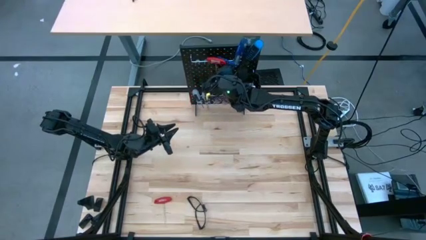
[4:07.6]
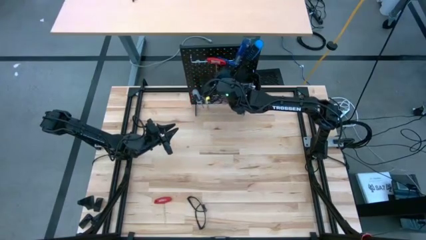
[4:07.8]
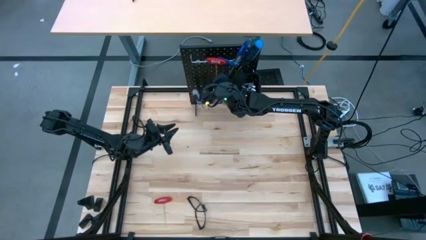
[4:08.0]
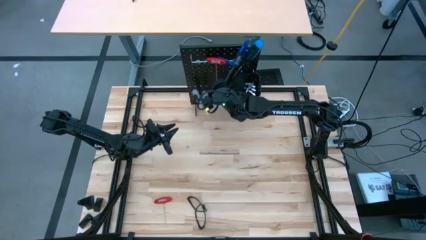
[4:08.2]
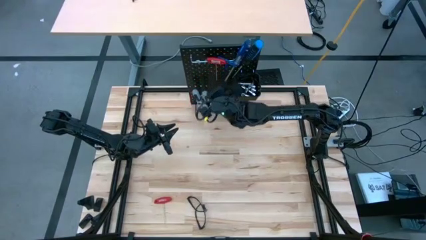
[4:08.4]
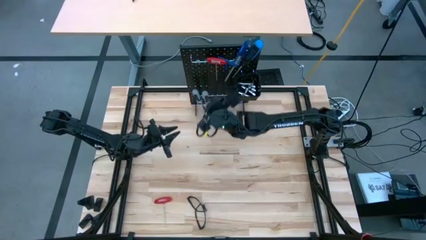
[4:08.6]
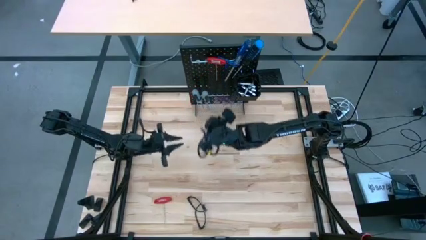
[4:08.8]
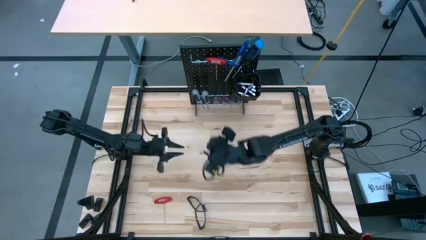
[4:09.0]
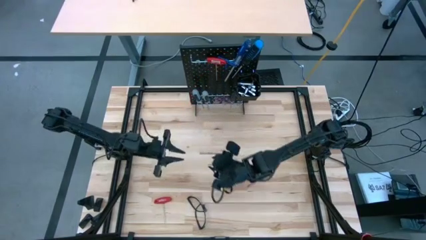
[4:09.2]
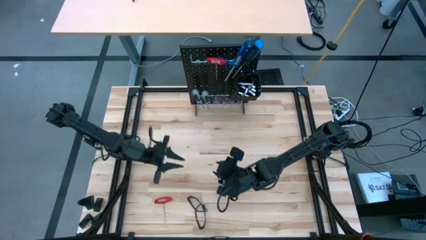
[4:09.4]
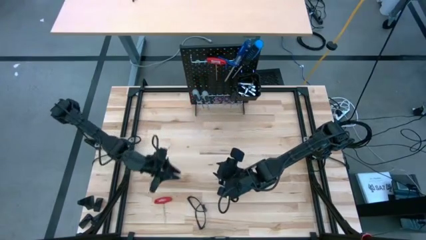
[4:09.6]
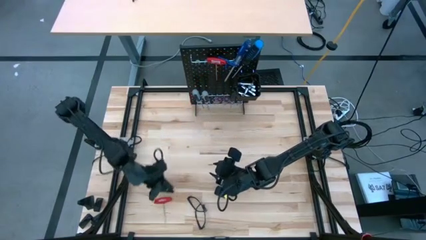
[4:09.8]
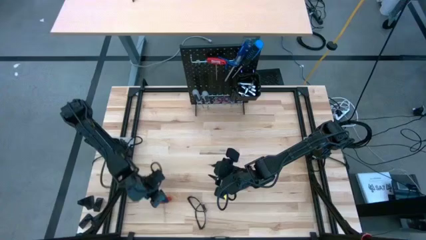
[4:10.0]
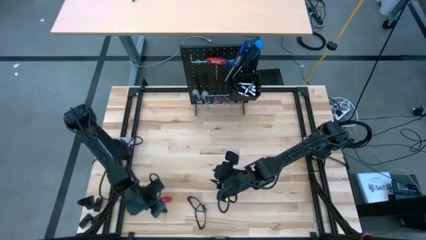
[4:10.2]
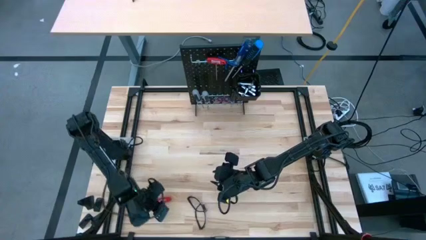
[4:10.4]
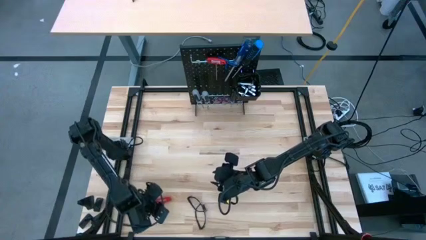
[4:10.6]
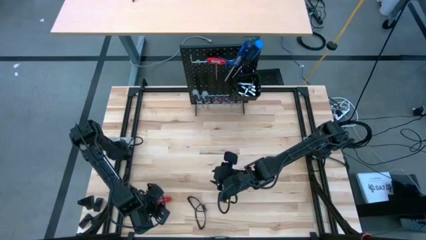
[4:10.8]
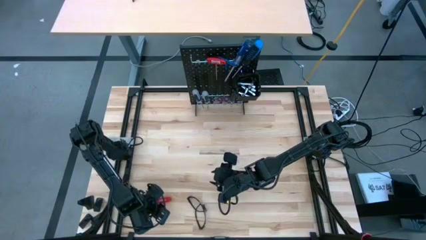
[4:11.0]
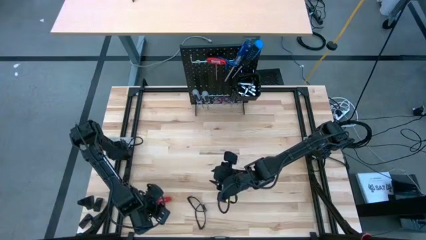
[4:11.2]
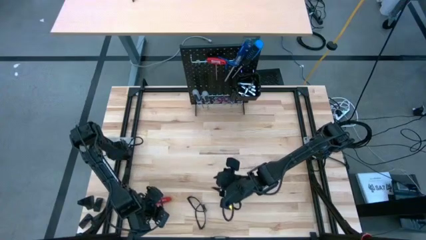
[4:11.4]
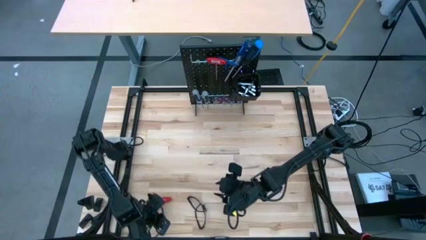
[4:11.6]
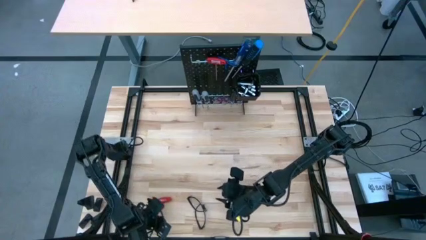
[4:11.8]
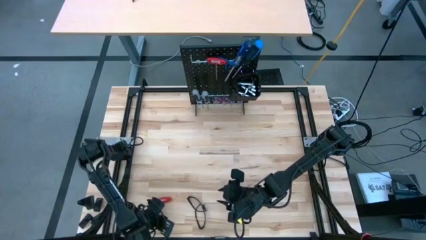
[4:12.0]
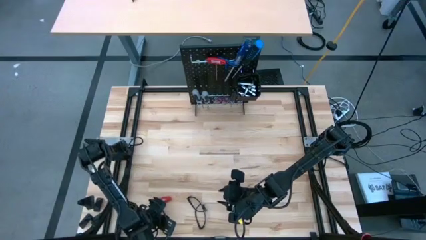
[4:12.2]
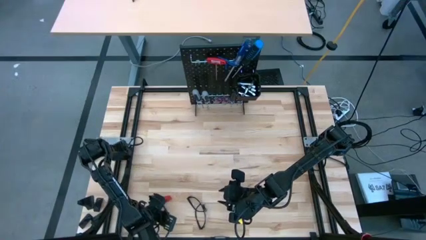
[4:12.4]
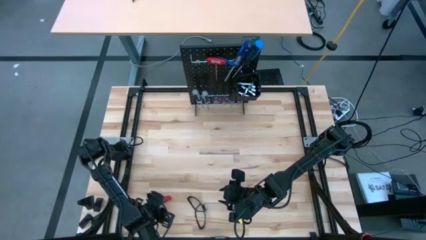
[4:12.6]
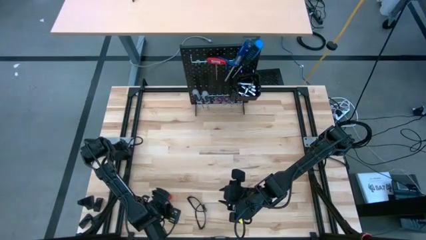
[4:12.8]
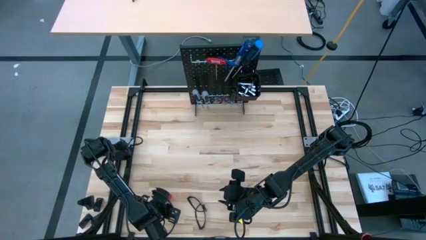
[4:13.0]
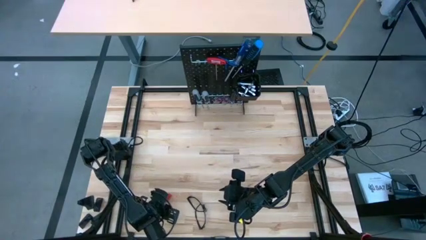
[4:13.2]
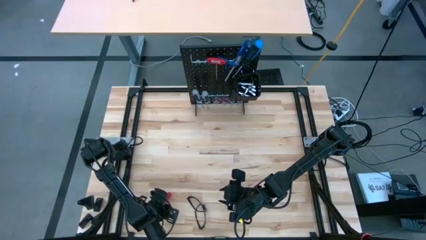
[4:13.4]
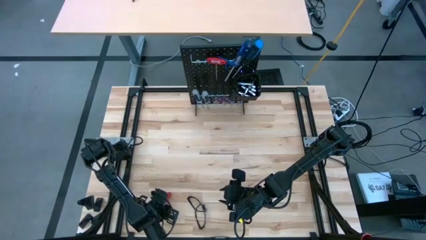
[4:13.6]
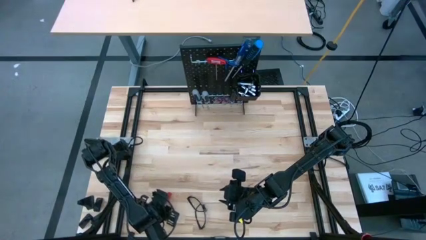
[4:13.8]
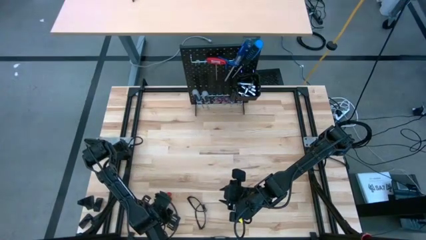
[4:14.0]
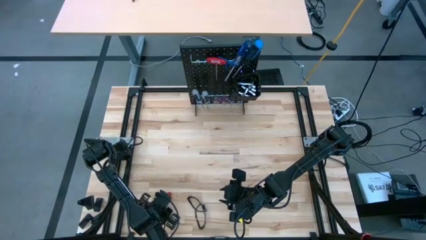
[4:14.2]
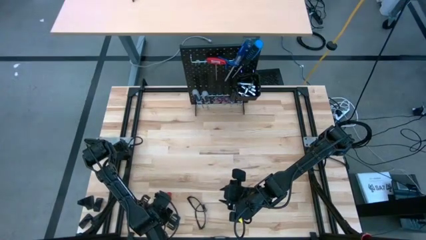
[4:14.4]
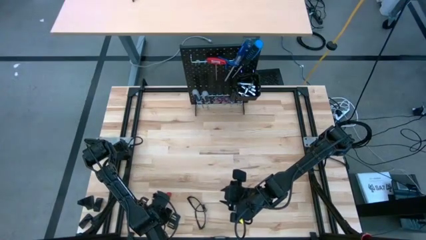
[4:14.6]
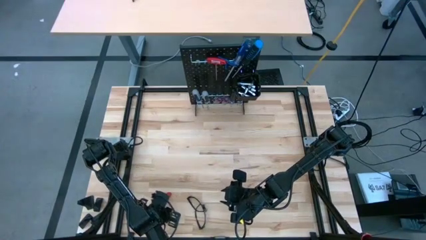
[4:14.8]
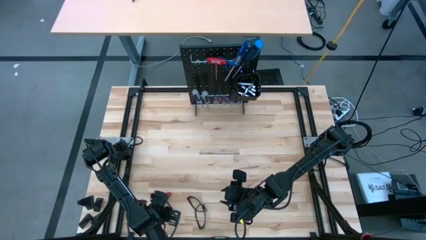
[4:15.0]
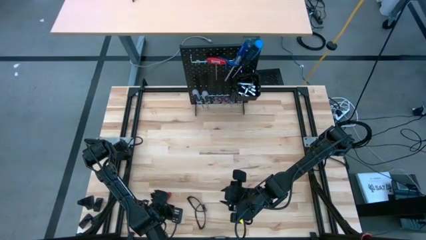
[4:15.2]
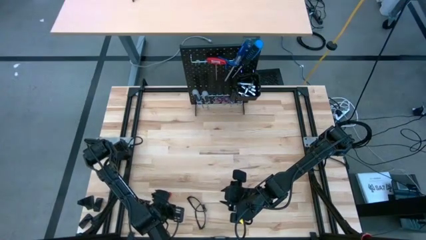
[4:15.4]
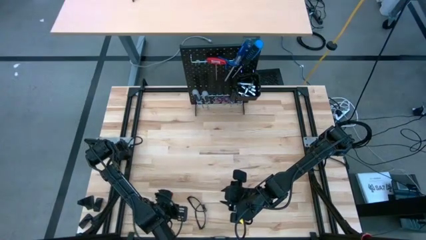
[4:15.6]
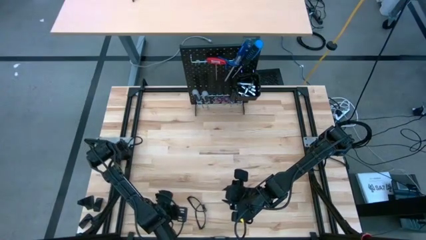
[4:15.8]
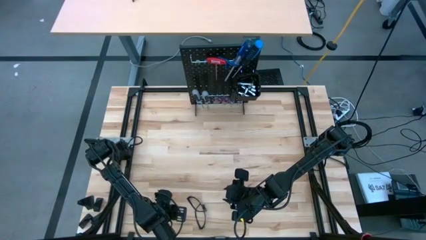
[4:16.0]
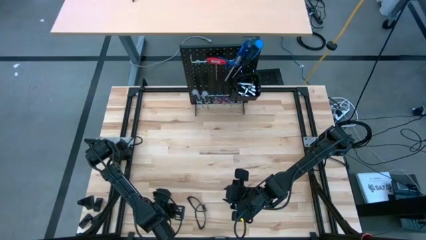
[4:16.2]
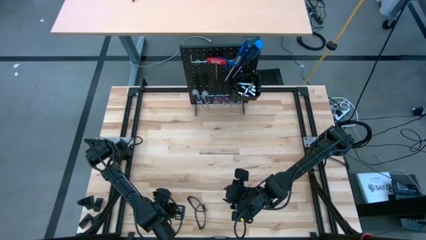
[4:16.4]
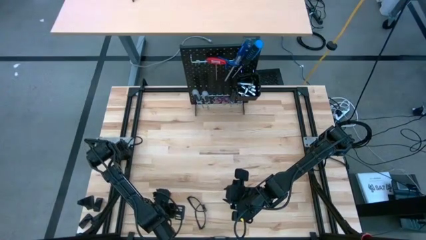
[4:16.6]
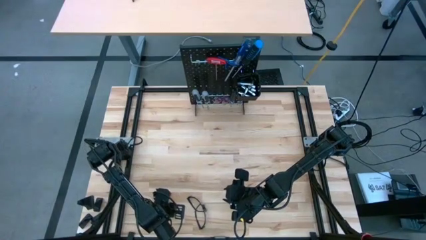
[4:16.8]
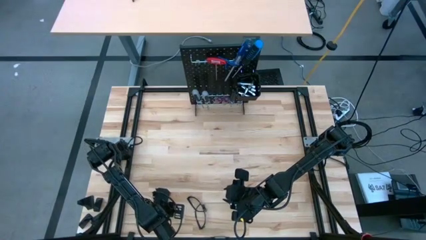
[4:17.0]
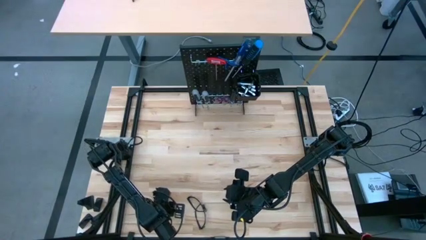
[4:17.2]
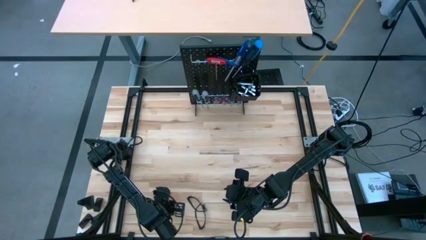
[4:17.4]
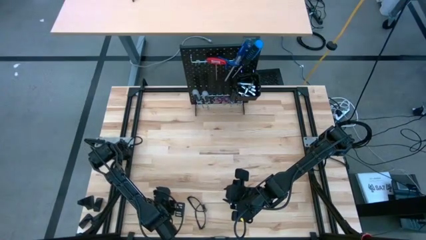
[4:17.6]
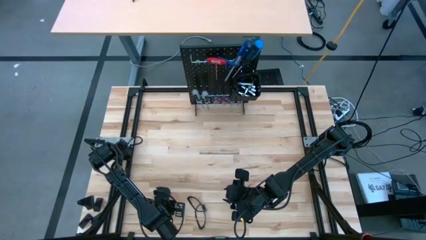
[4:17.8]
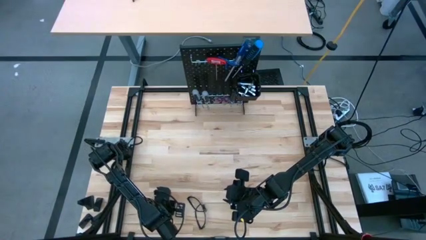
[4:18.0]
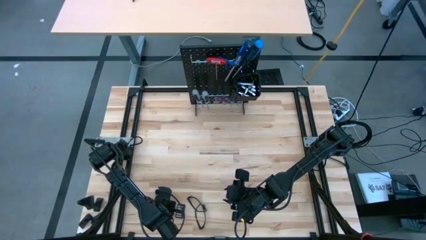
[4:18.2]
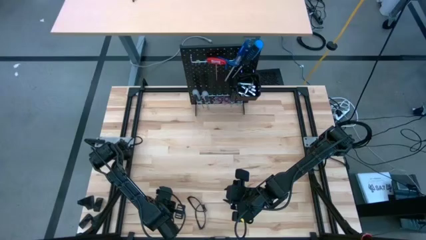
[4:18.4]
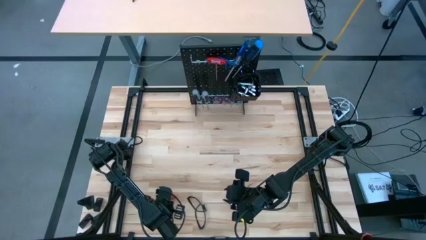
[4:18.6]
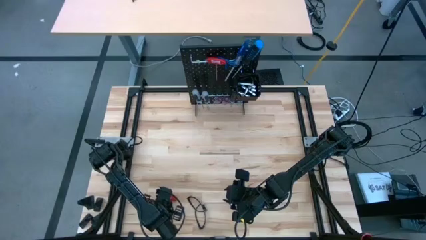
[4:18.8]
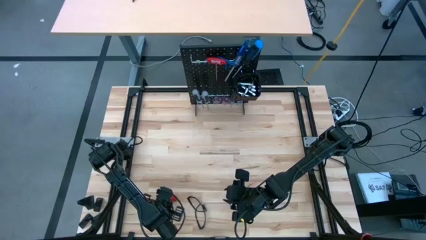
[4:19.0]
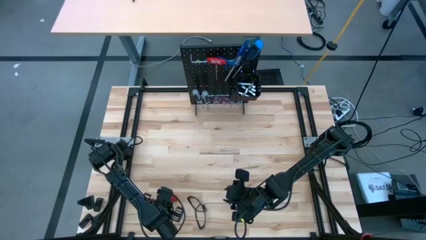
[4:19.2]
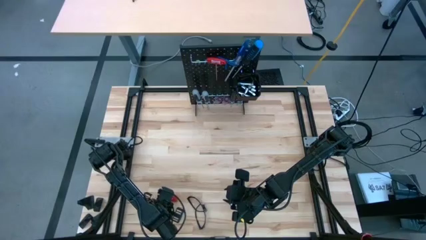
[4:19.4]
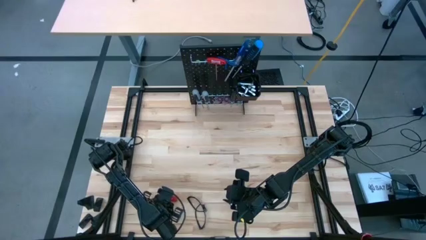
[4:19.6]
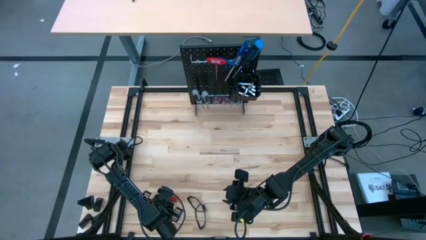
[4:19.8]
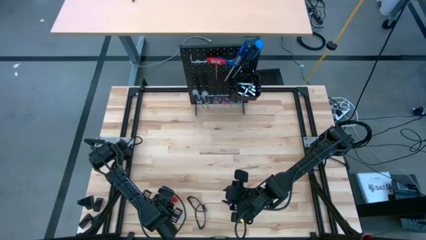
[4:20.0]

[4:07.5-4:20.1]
Task: Hang tools onto peg board
Hang the allen wrench on the pegboard

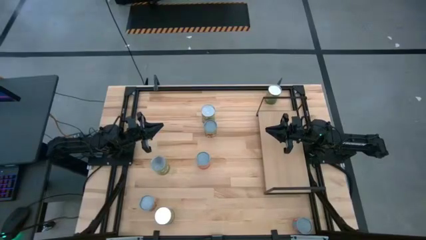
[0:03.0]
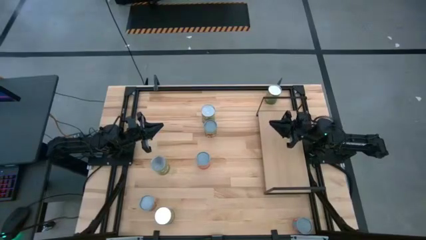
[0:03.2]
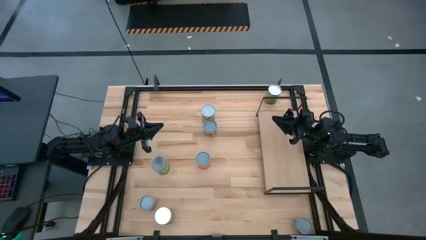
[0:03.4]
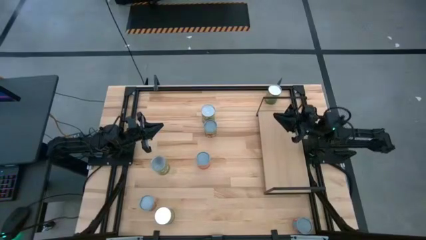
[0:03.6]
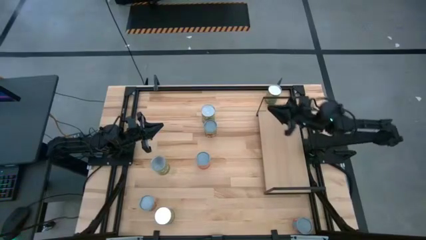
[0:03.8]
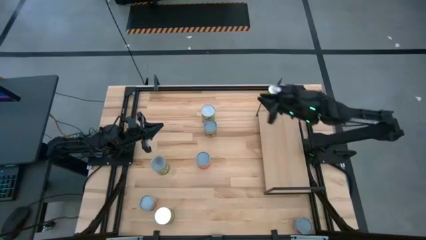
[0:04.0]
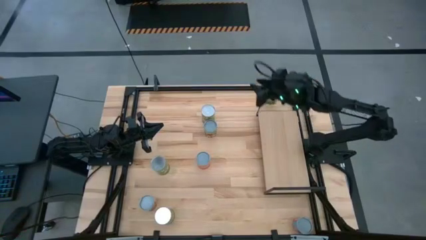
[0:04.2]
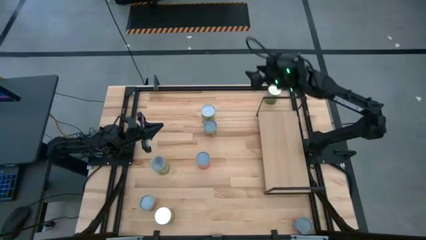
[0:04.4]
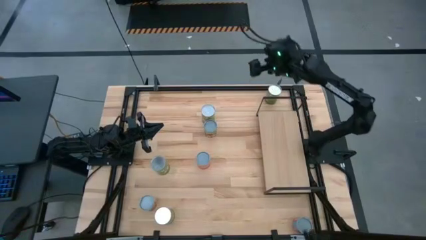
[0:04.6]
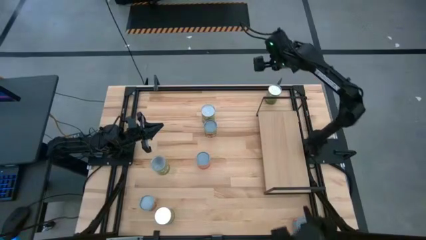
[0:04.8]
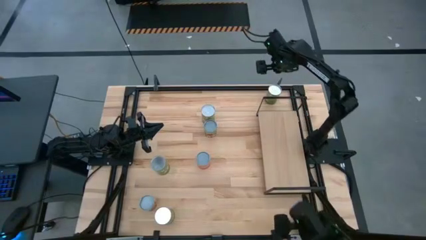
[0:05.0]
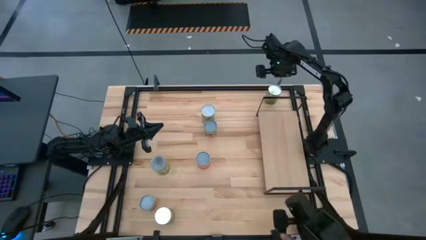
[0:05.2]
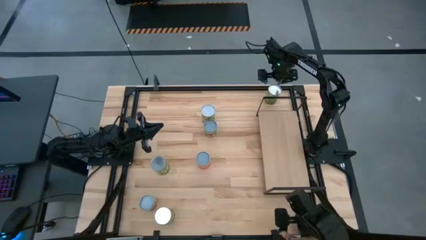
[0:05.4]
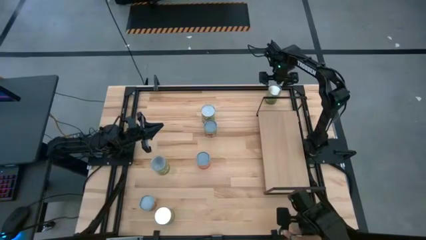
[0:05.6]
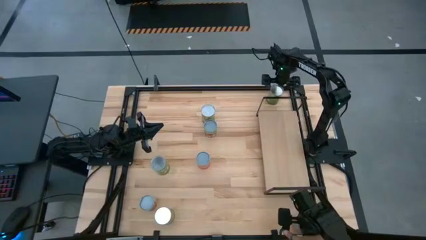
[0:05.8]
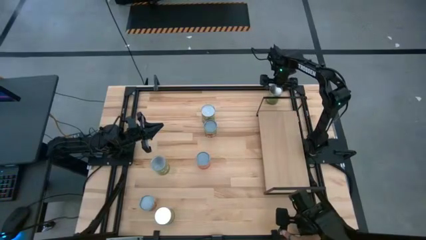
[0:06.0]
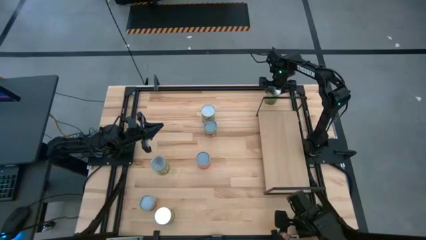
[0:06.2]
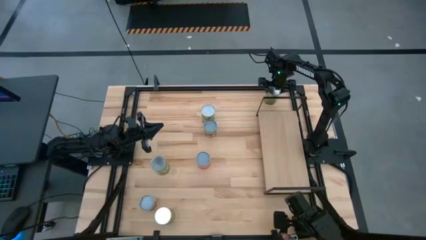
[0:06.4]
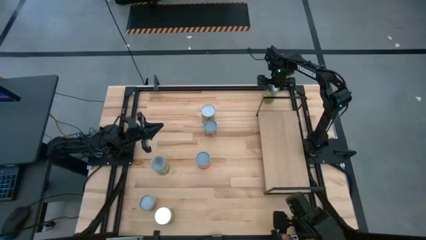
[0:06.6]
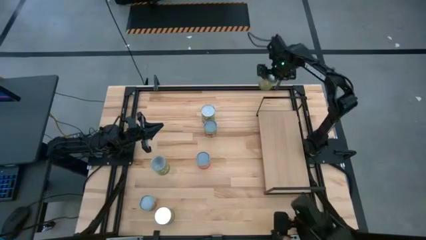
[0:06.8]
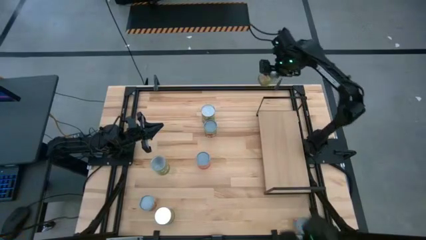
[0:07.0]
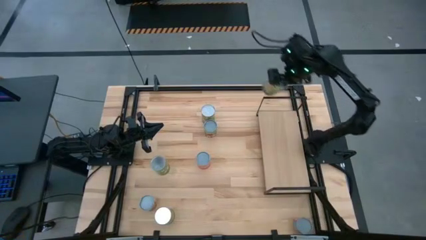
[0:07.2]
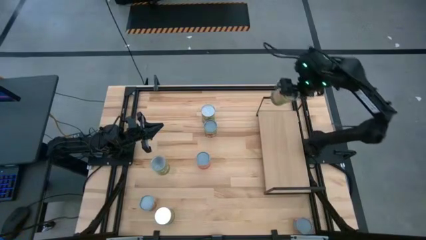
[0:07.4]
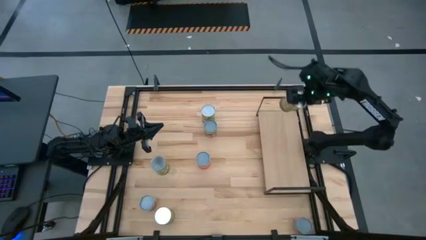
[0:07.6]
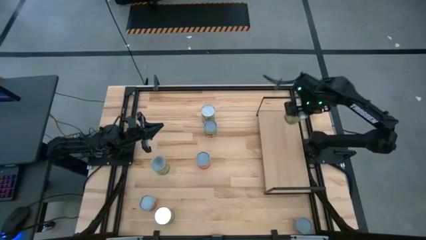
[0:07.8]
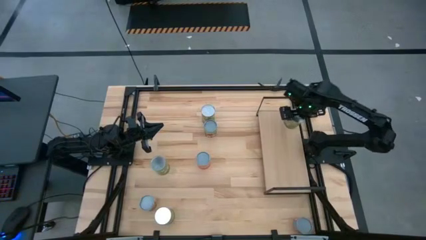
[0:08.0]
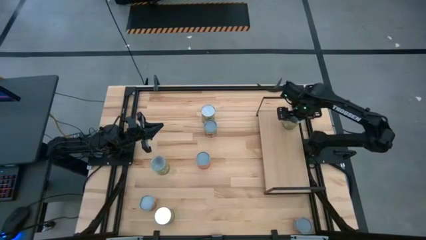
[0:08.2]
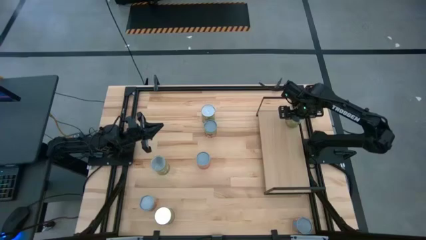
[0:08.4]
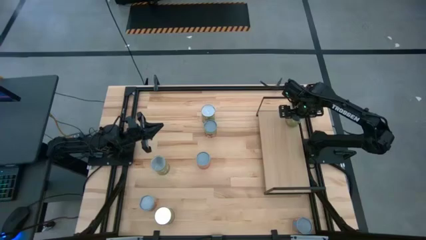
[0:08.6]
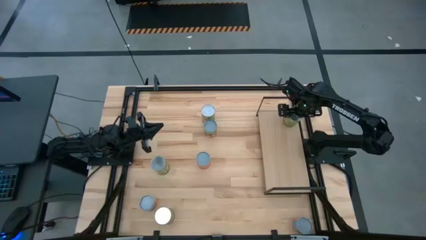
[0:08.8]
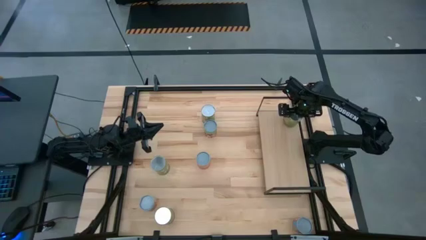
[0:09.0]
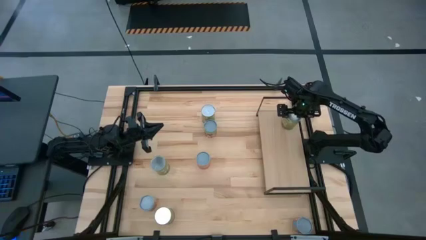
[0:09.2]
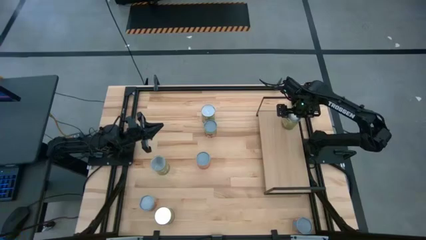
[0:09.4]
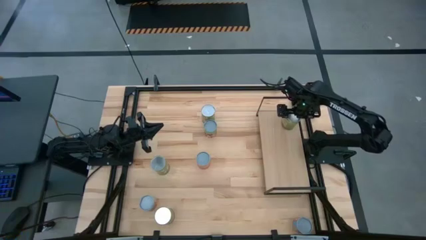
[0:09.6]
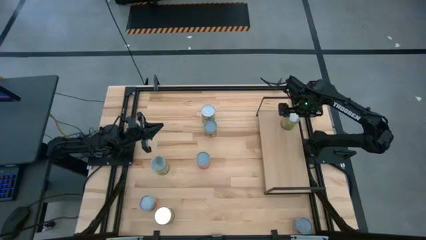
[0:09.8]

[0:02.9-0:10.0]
Task: Pick and place cans onto a shelf
Put the top large canned oranges on the shelf
